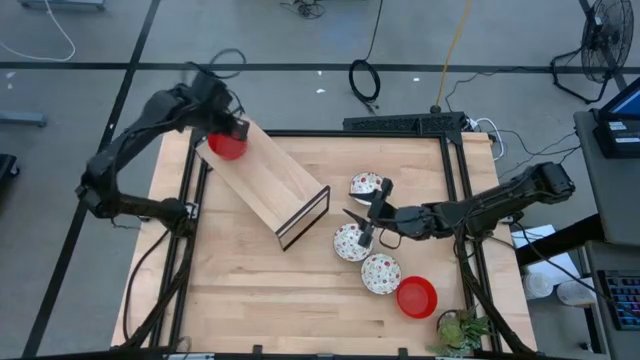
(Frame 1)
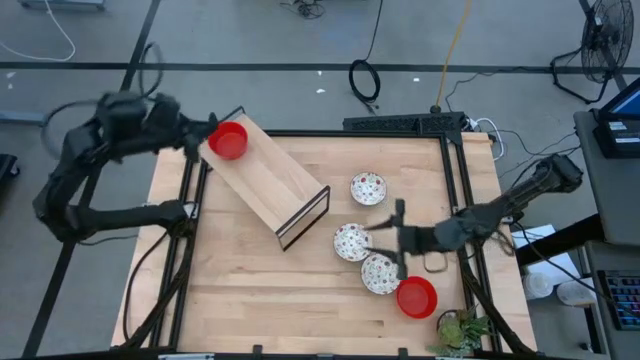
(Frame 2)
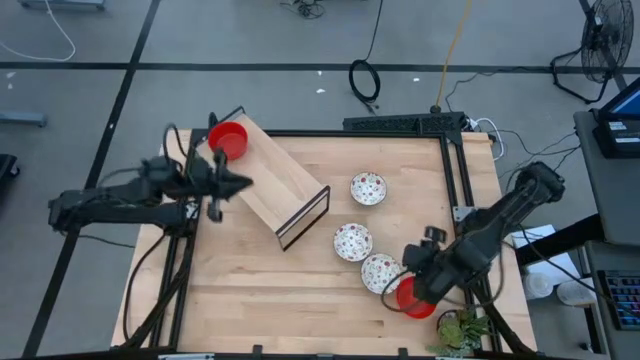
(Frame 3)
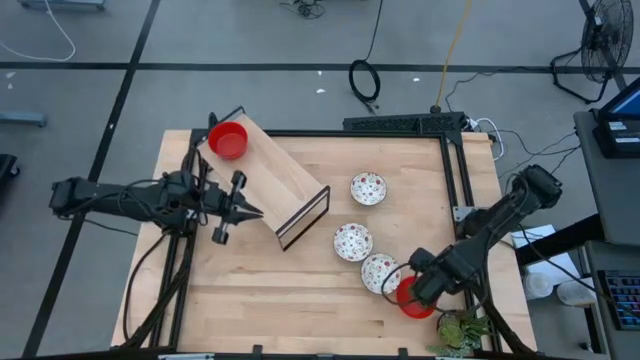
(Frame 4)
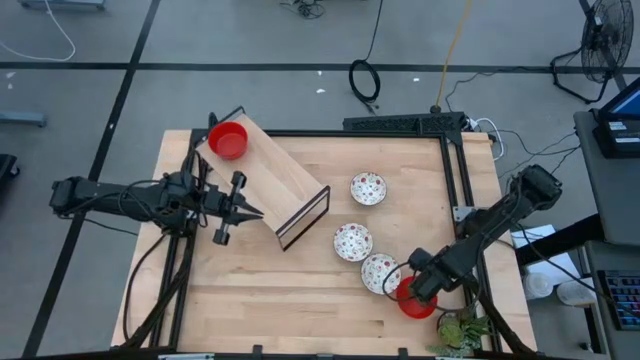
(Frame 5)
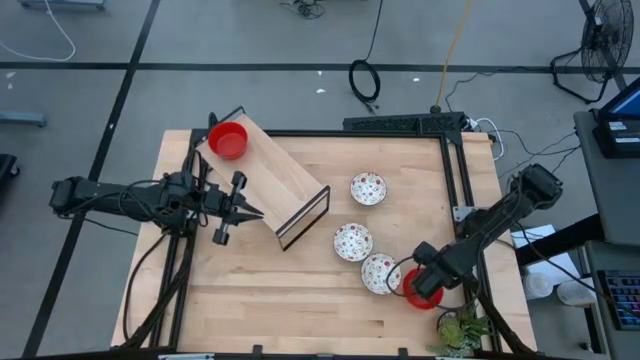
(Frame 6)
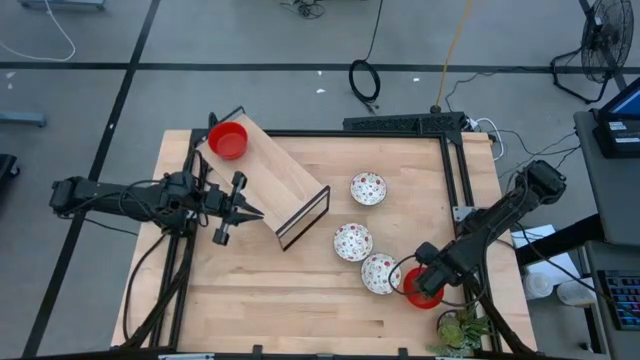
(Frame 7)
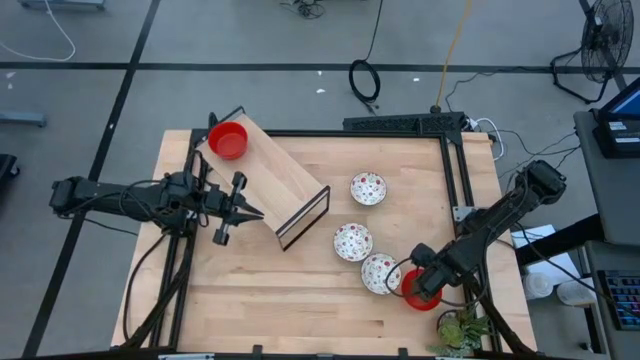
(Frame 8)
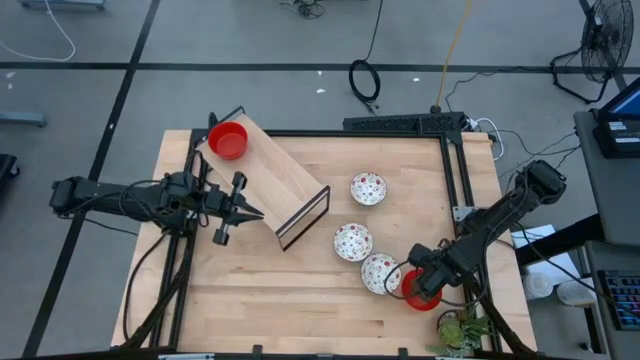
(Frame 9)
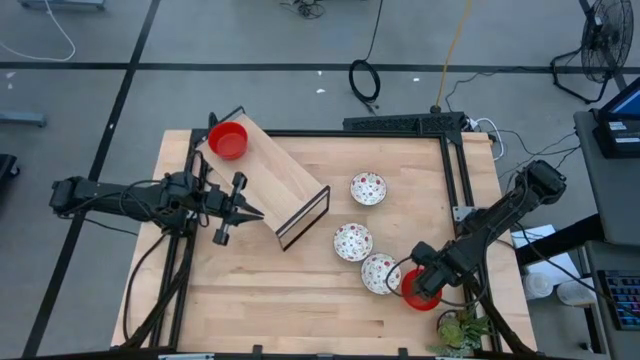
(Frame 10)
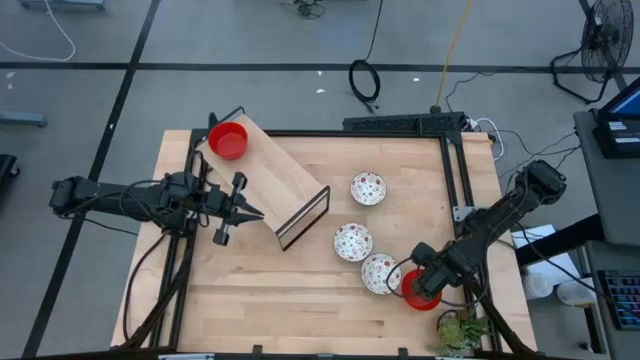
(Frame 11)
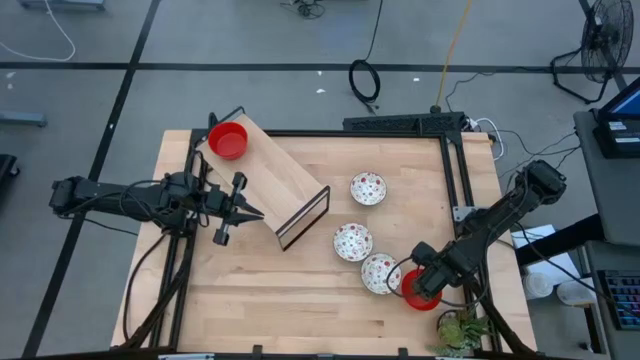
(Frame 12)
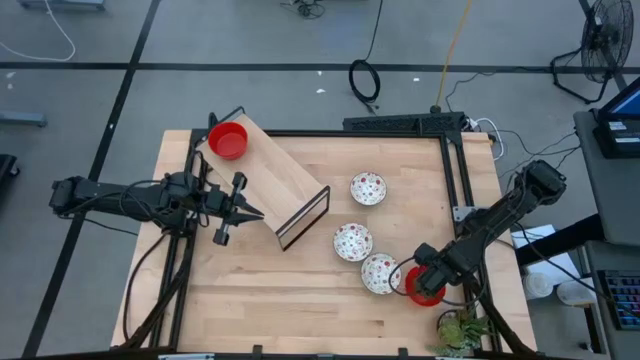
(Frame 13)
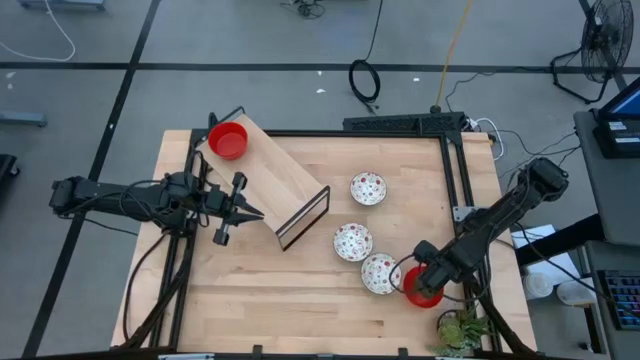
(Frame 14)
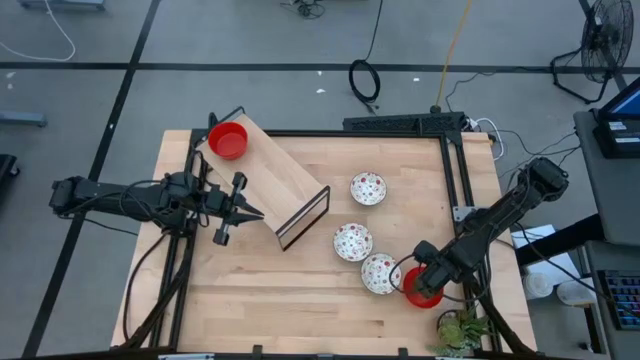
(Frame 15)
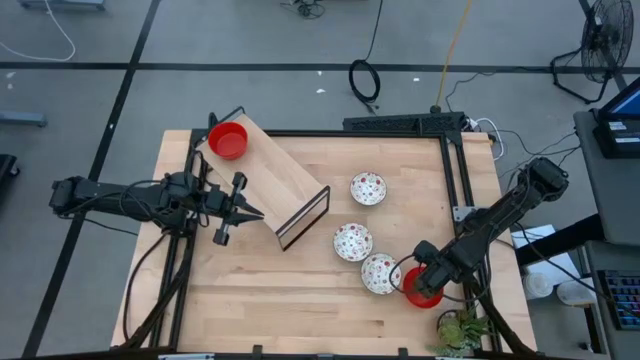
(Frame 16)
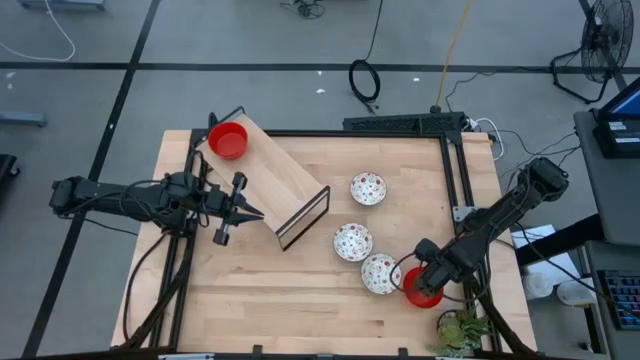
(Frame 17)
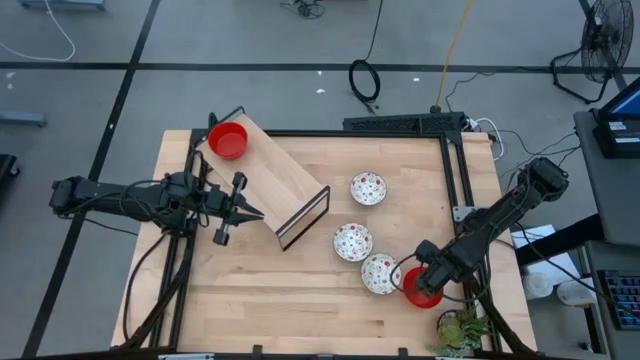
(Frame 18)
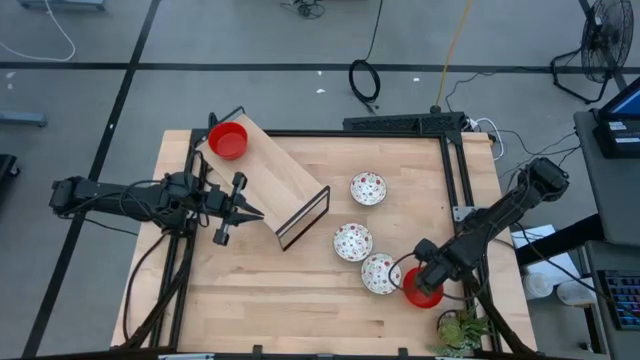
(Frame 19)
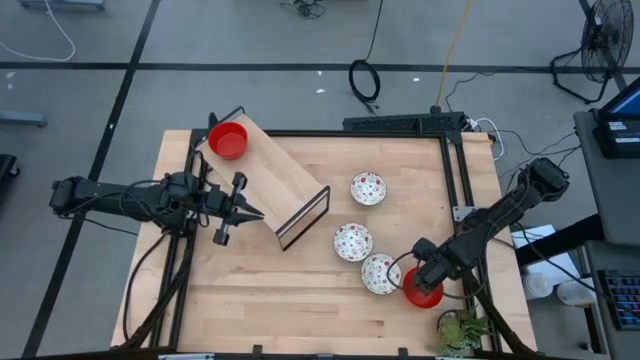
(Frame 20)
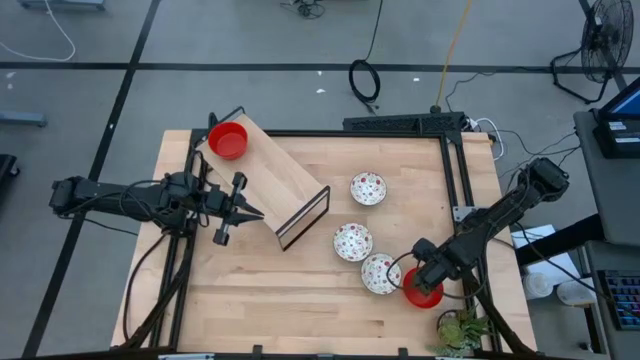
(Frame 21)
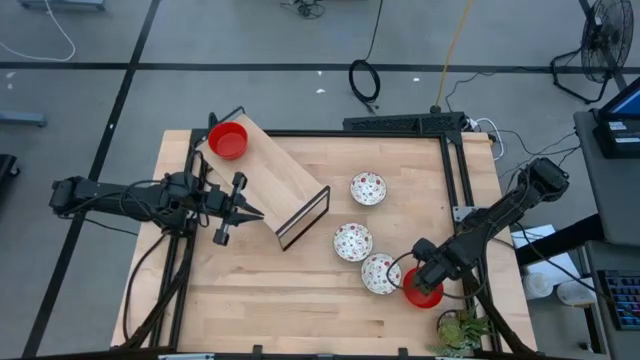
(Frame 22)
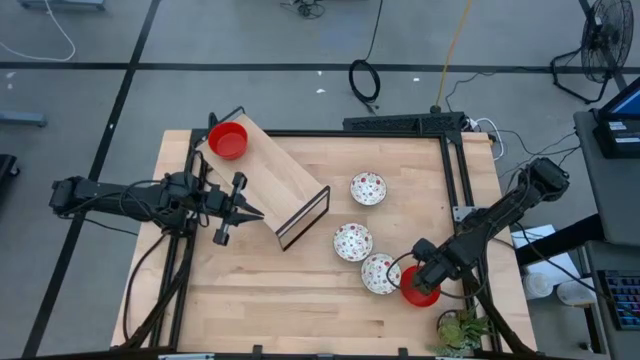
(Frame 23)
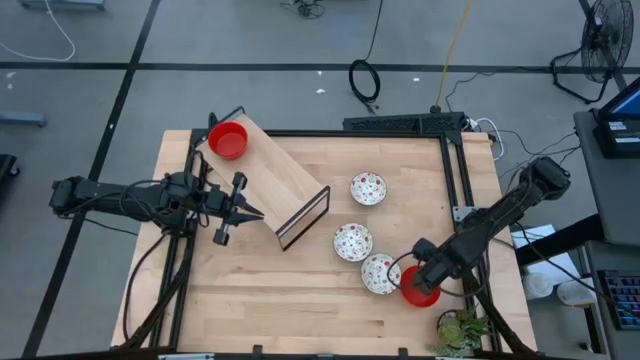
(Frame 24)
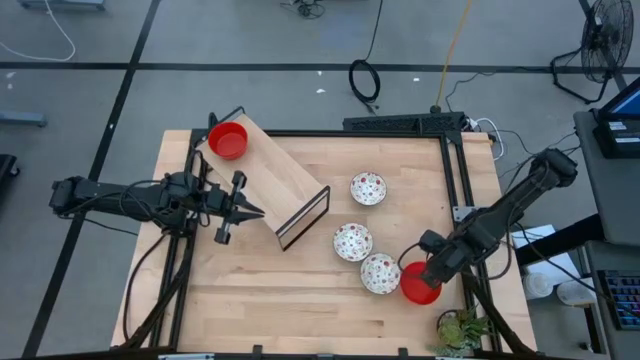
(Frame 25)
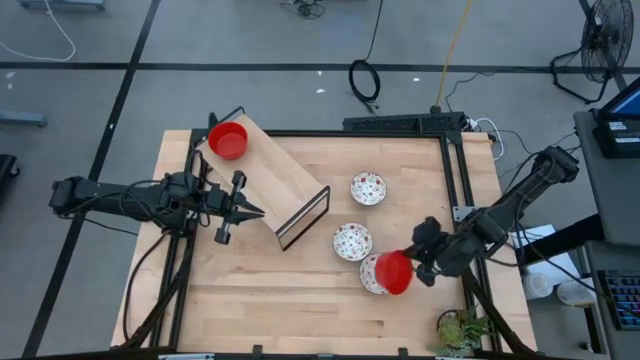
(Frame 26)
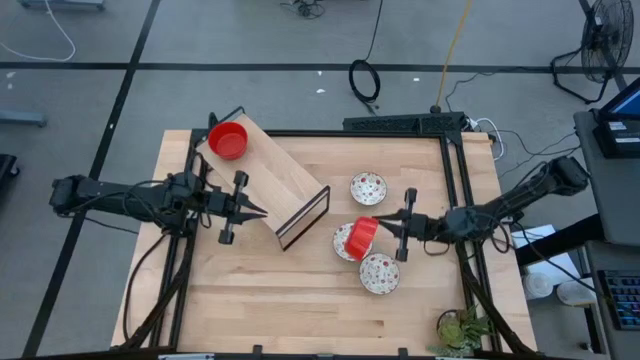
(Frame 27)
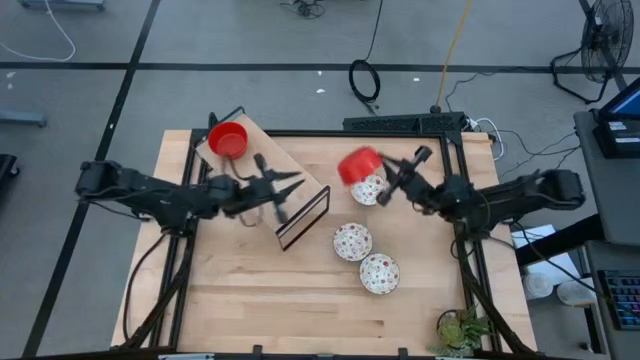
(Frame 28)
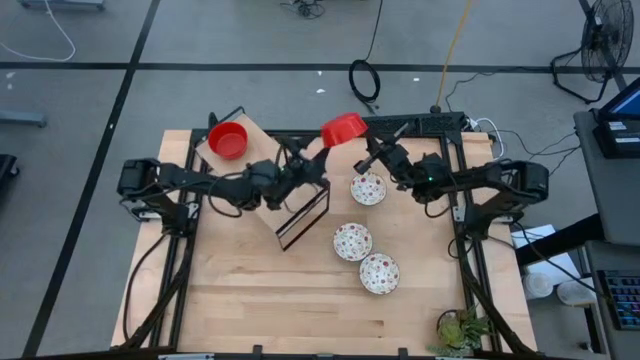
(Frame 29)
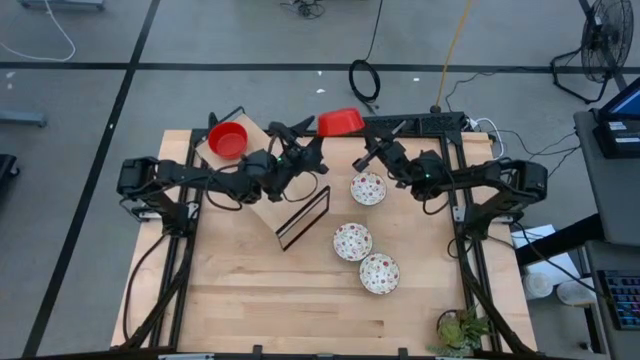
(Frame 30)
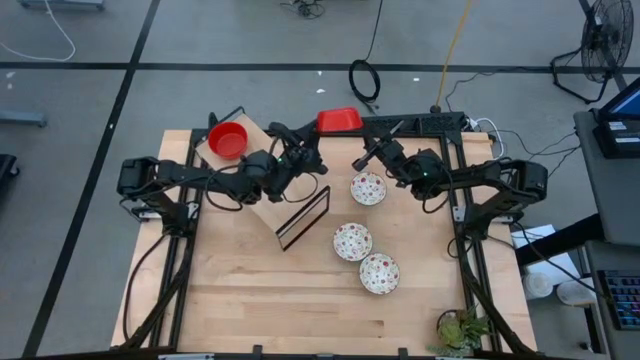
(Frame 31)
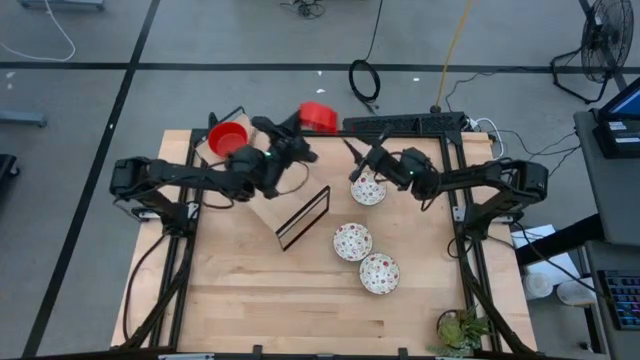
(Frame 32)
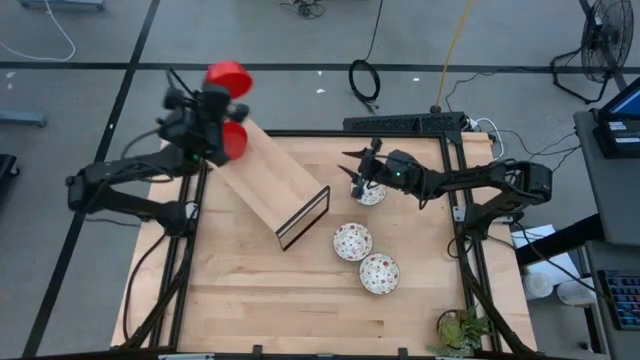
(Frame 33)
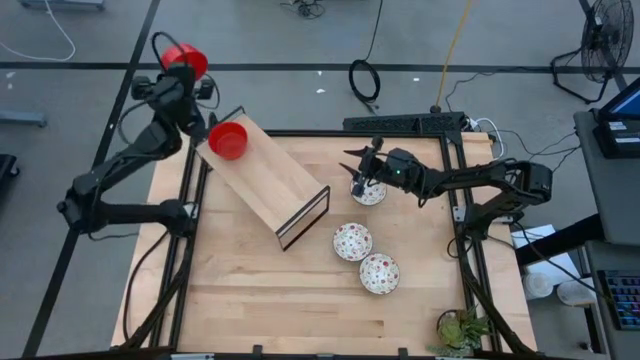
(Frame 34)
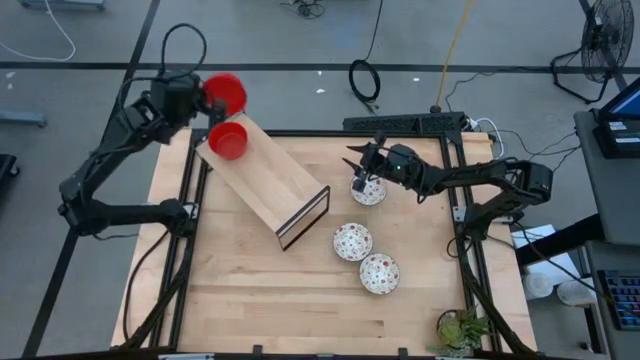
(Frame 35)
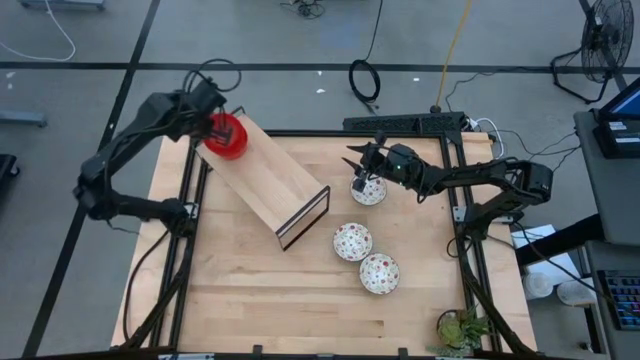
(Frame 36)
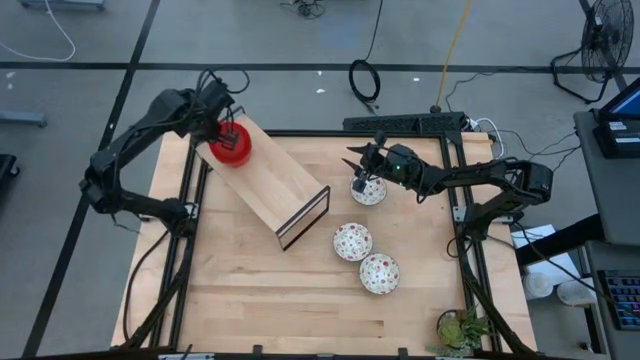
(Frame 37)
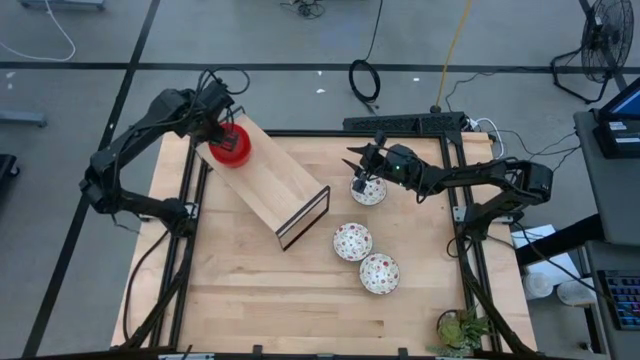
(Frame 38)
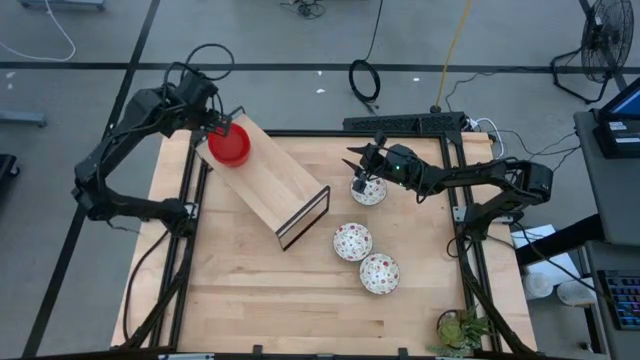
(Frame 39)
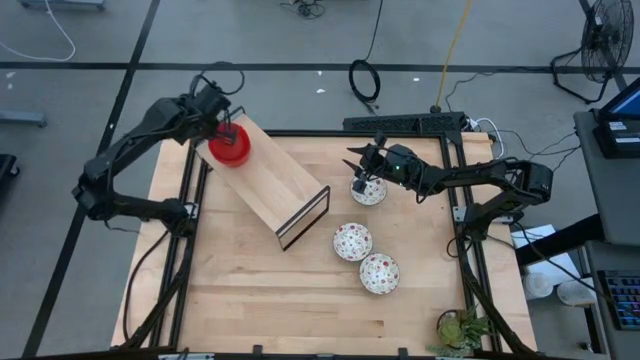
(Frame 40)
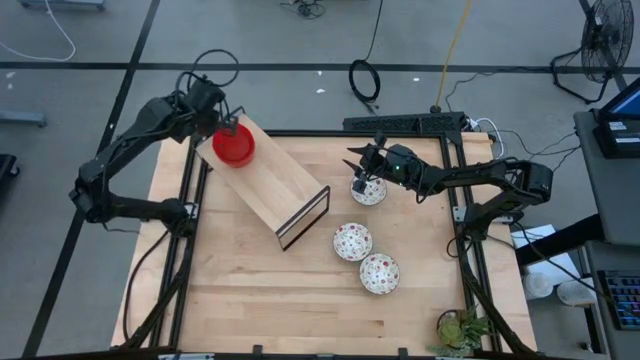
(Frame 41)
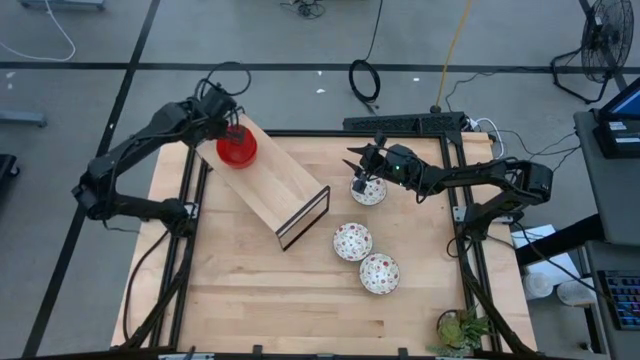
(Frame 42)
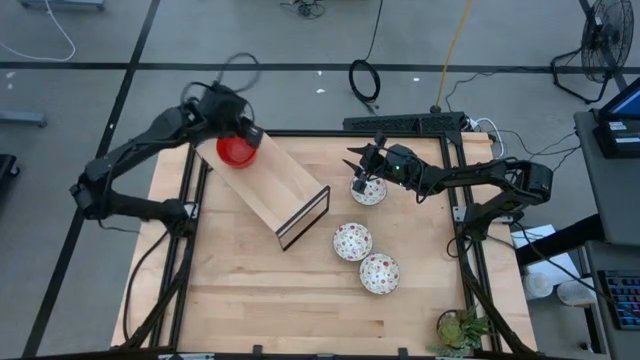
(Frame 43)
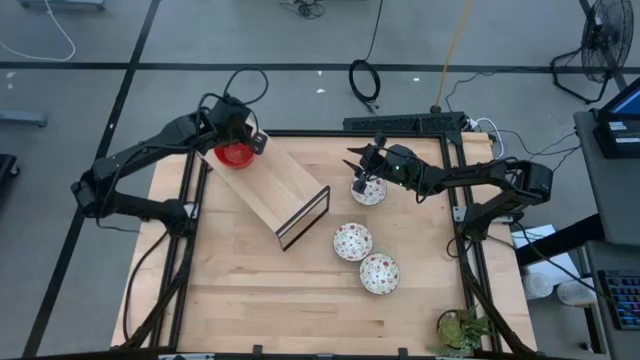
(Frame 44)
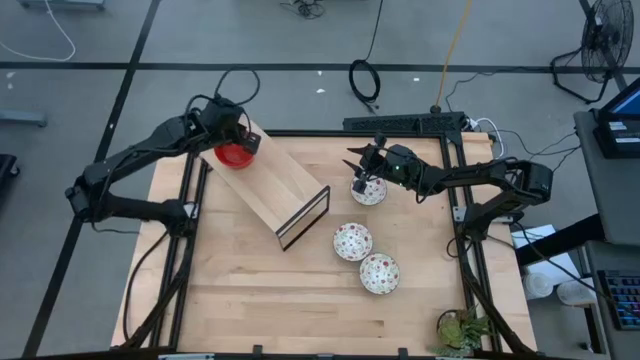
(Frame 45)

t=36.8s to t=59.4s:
Task: Pick & Place Mini bowls
Stack the red bowl on the red bowls on the shelf
